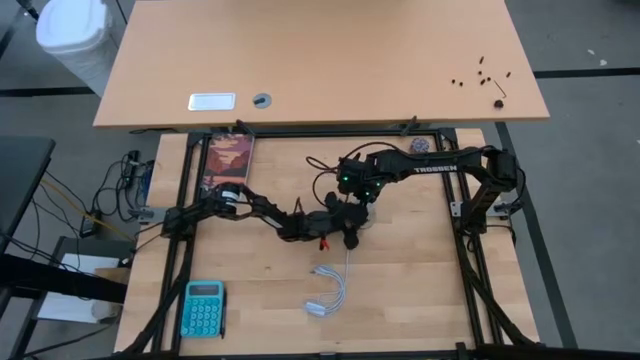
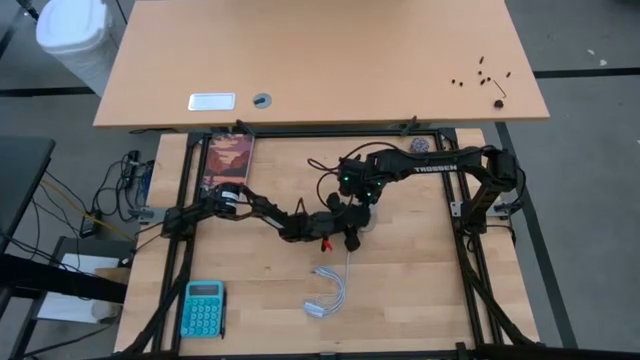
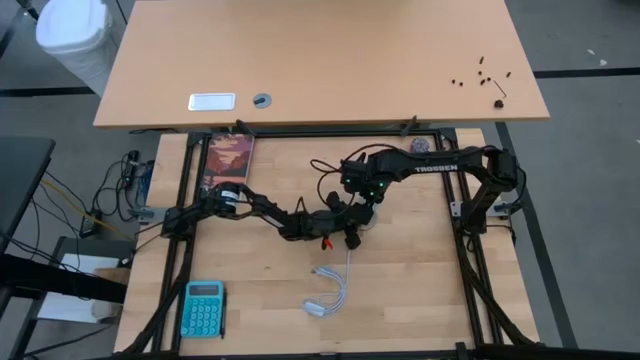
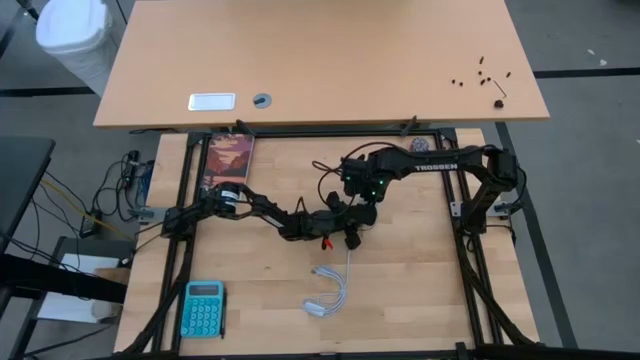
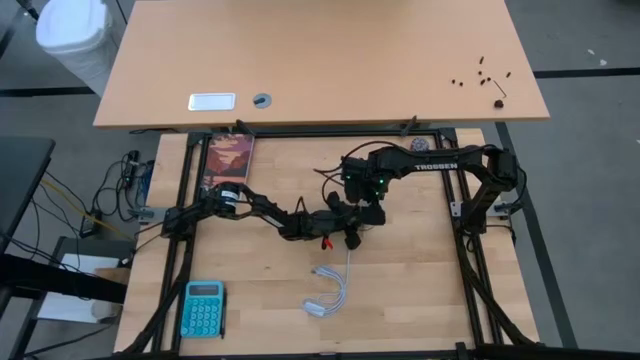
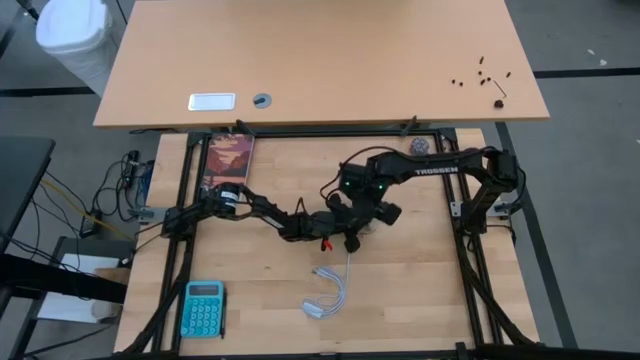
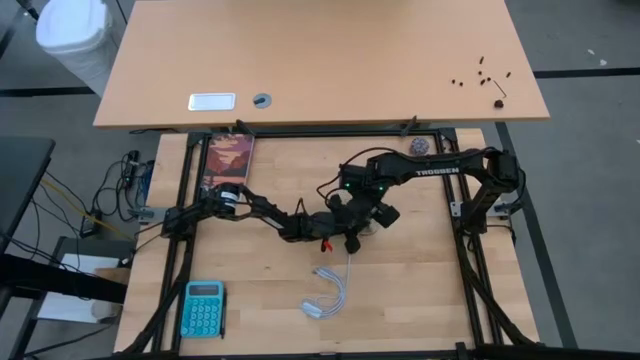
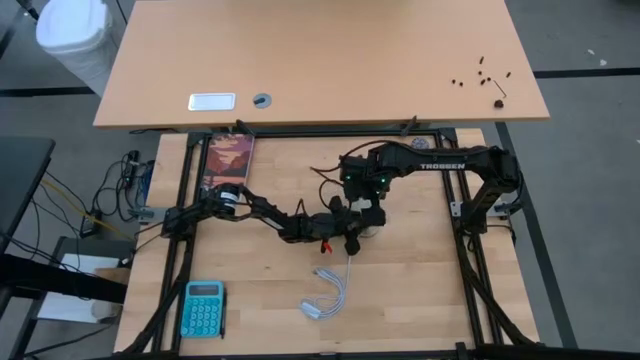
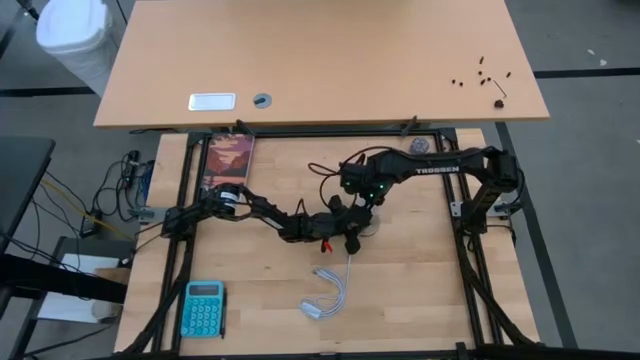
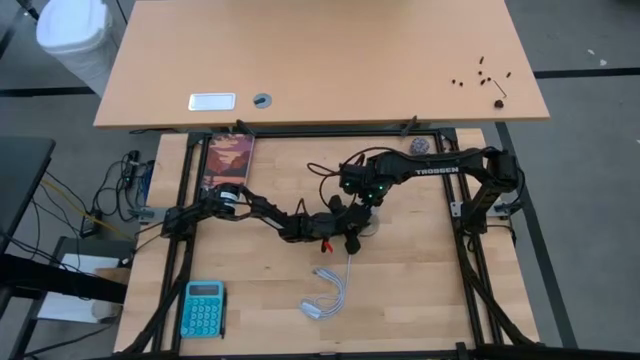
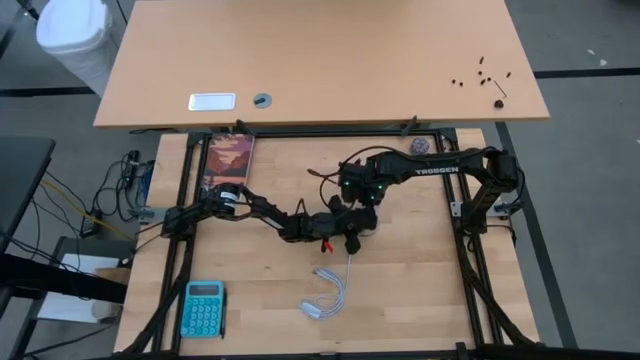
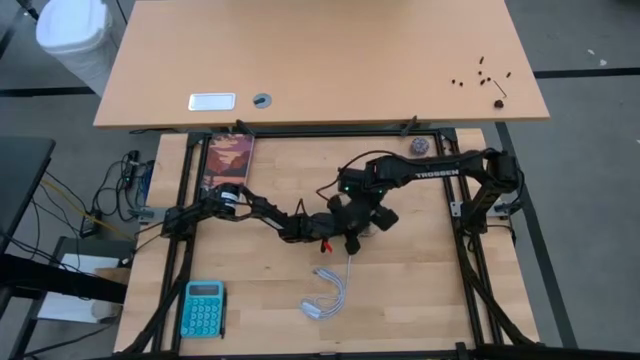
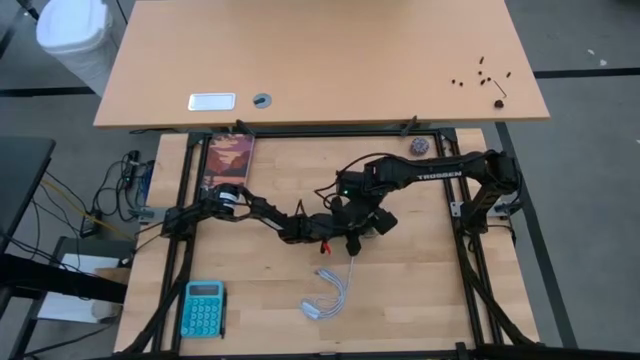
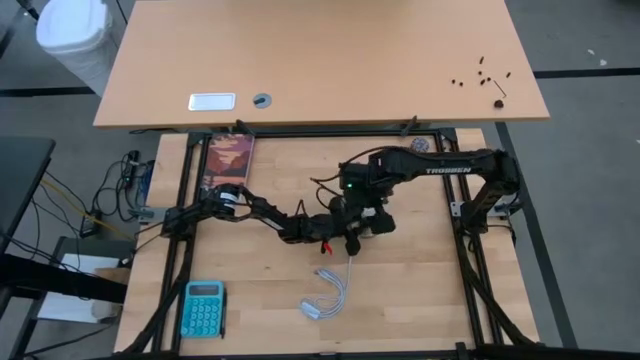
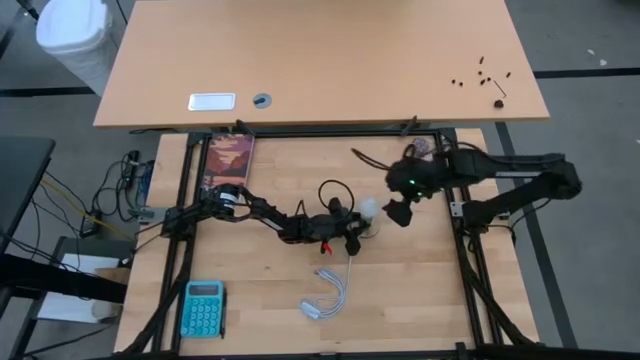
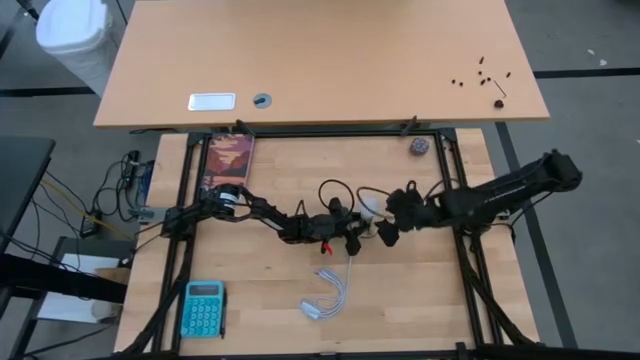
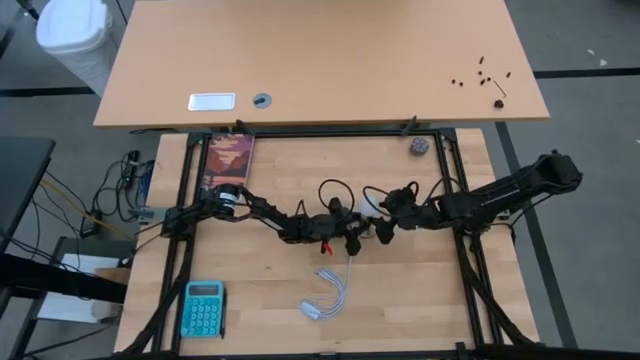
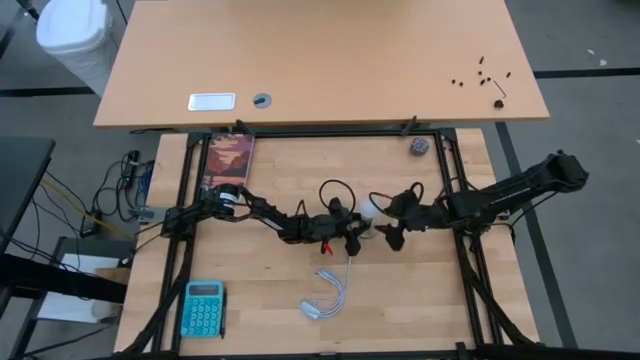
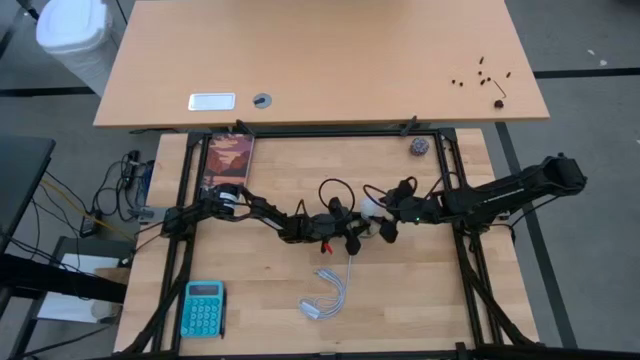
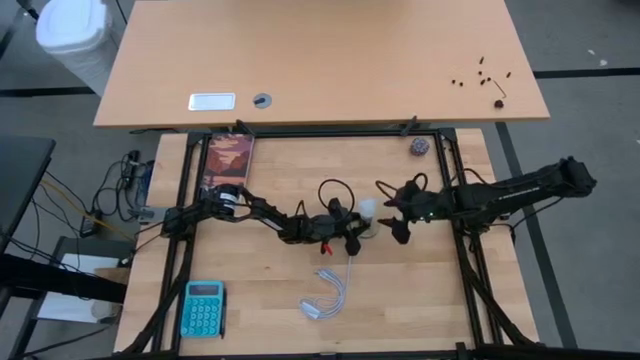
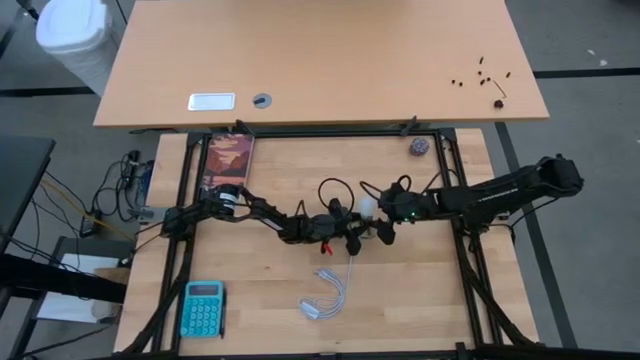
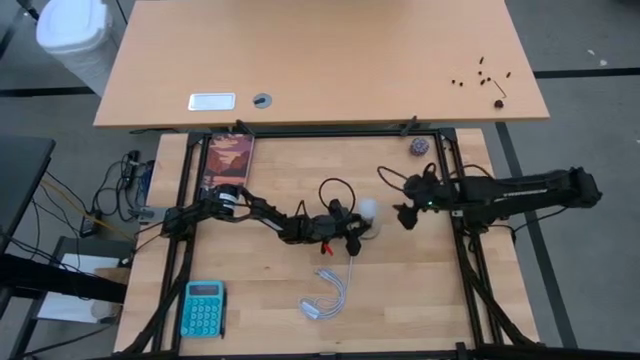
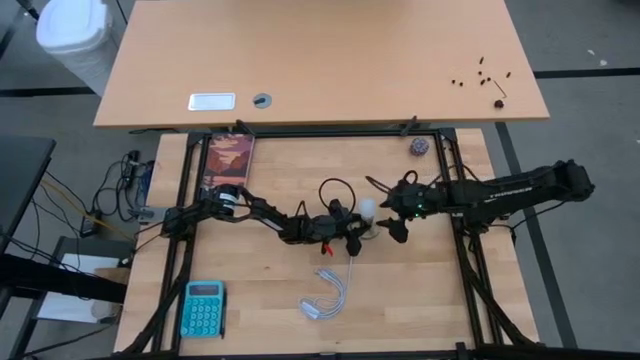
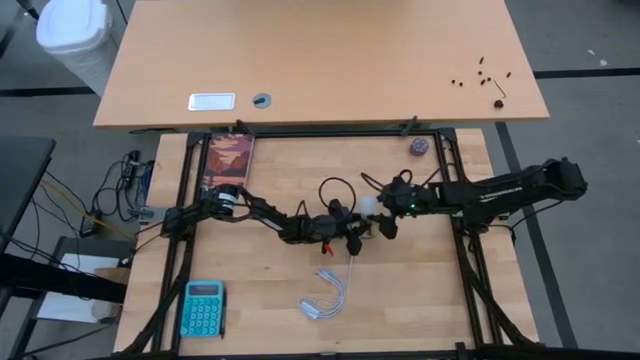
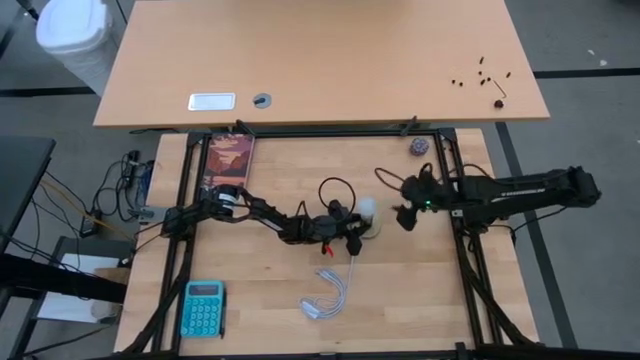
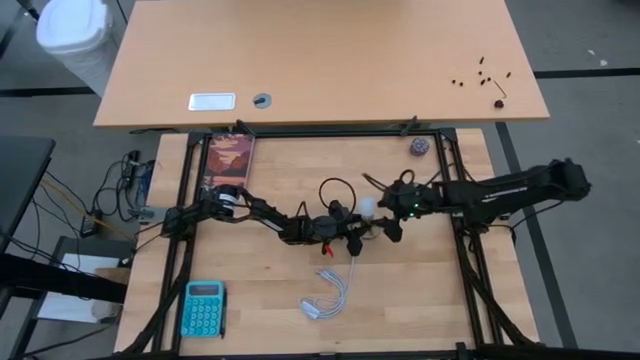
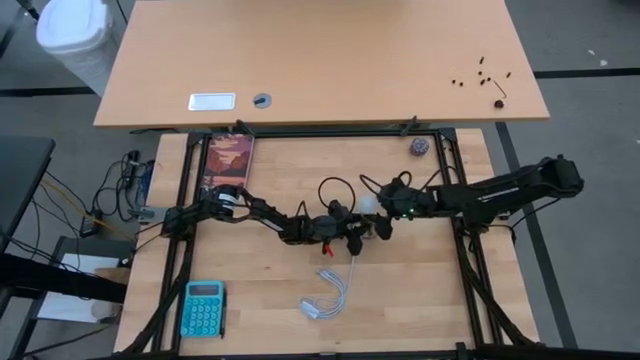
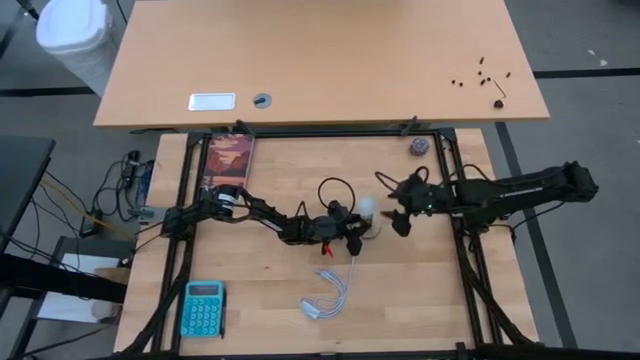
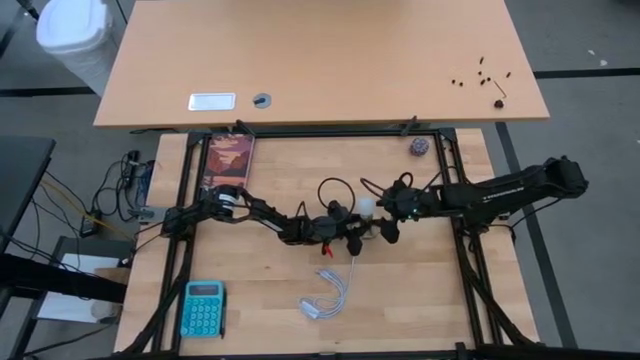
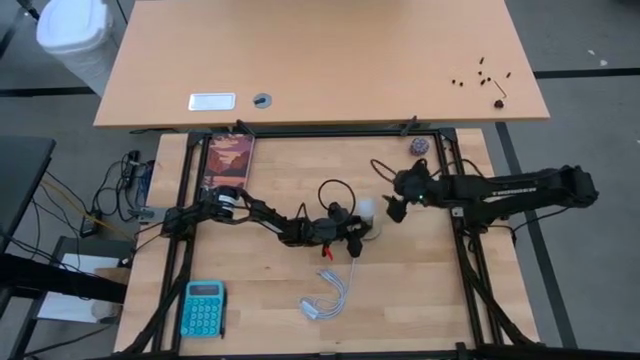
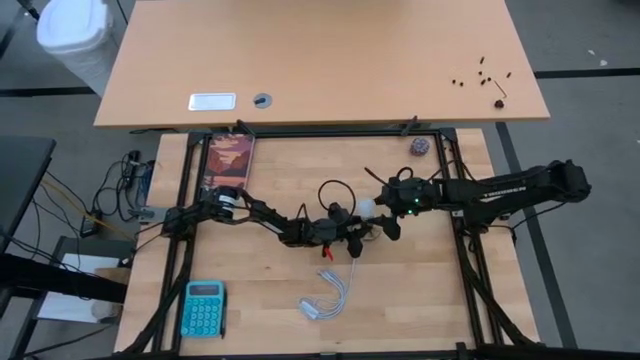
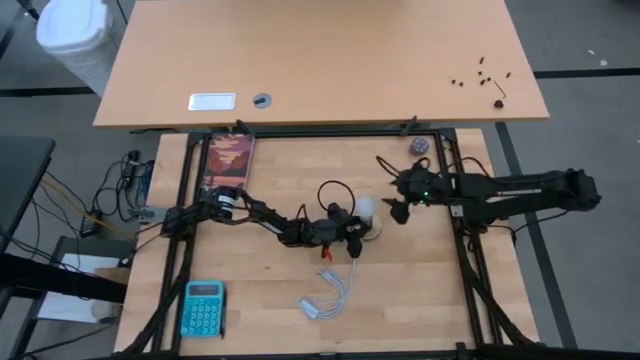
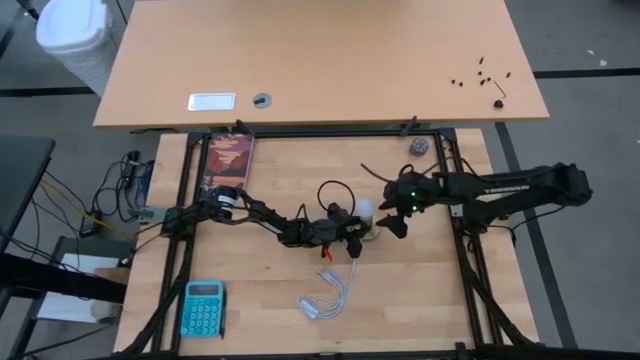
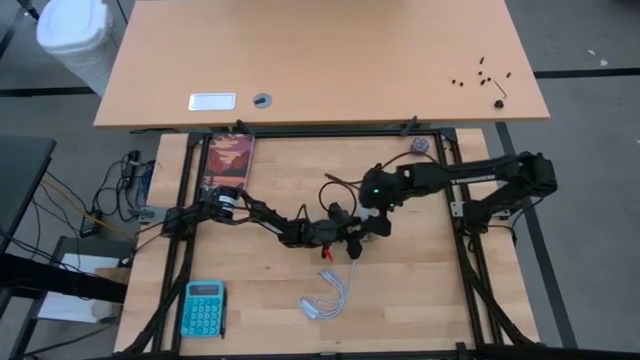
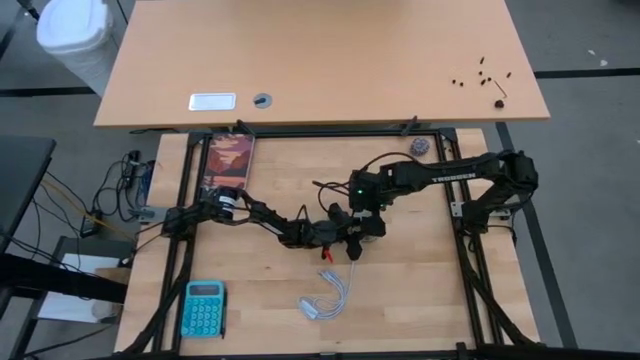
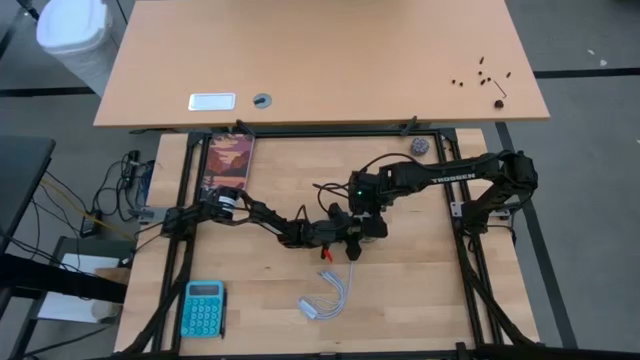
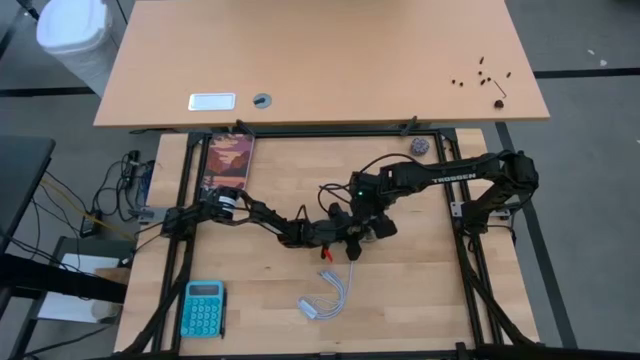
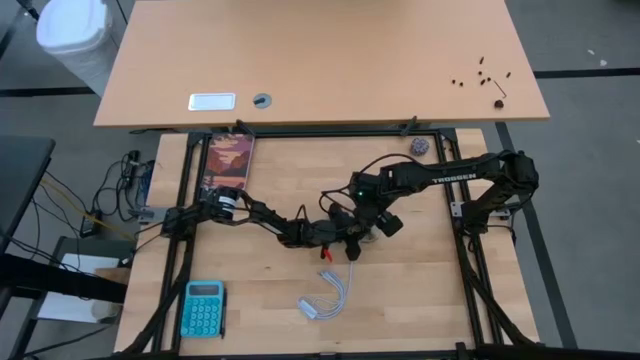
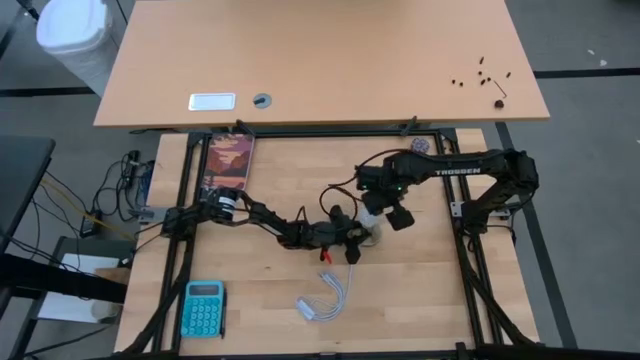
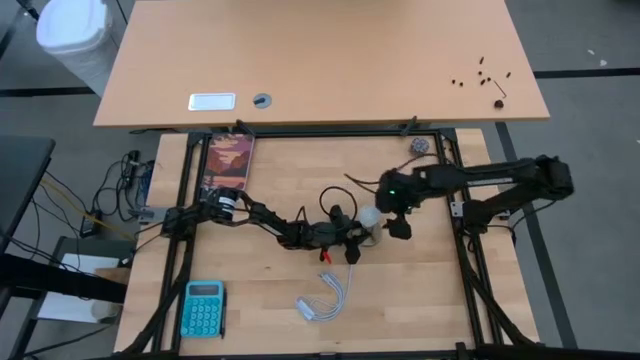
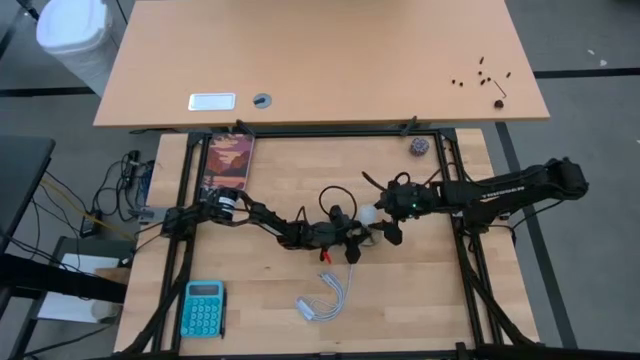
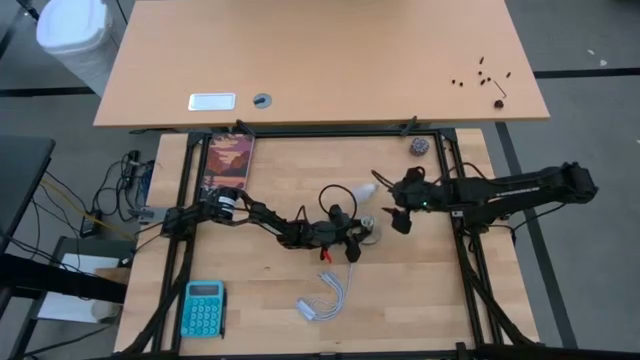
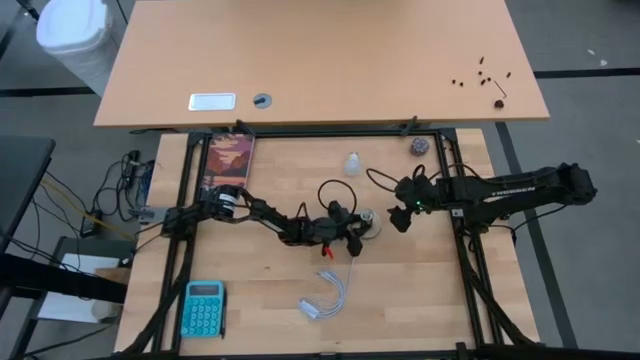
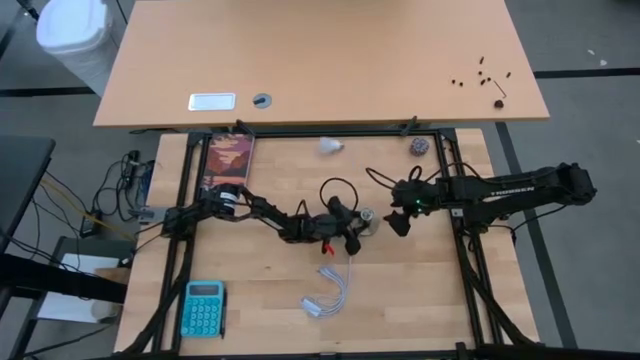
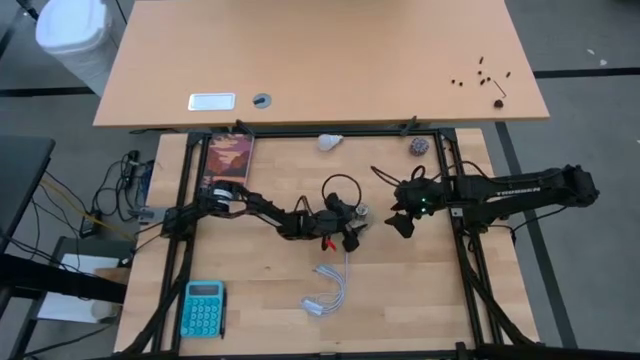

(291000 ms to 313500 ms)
Task: Screw lightbulb
Remove the lightbulb on the desk lamp
